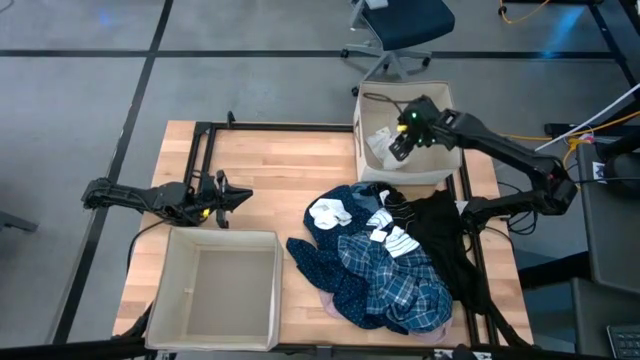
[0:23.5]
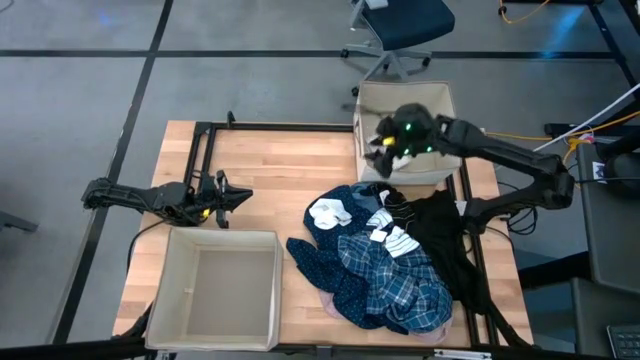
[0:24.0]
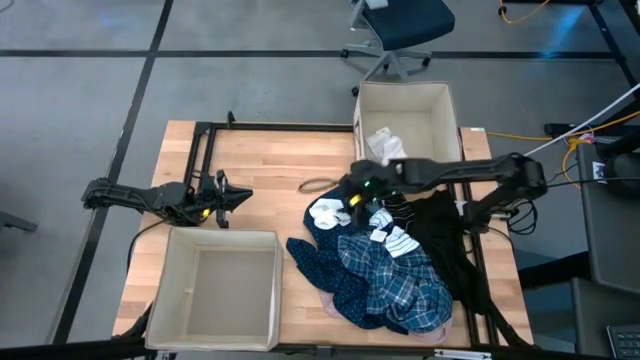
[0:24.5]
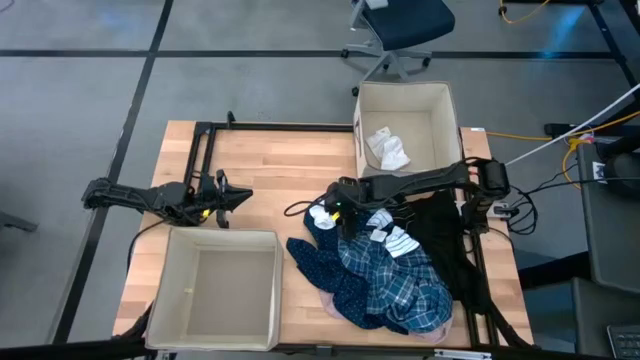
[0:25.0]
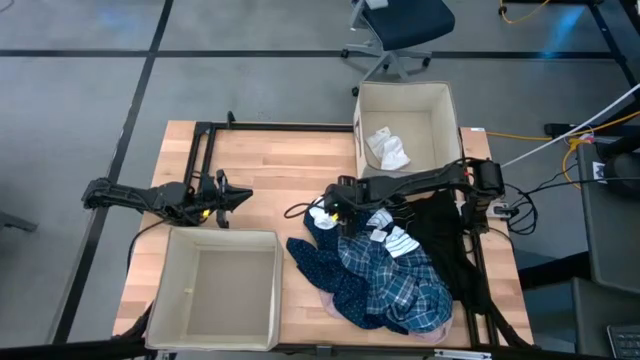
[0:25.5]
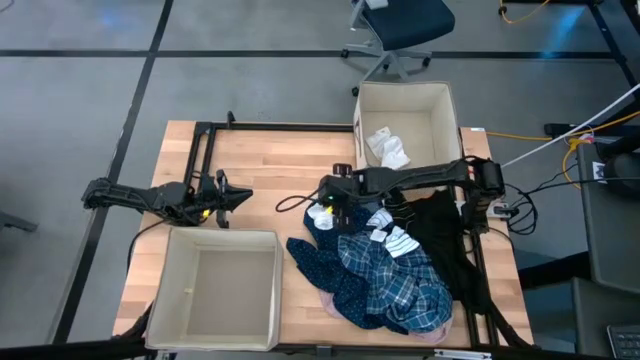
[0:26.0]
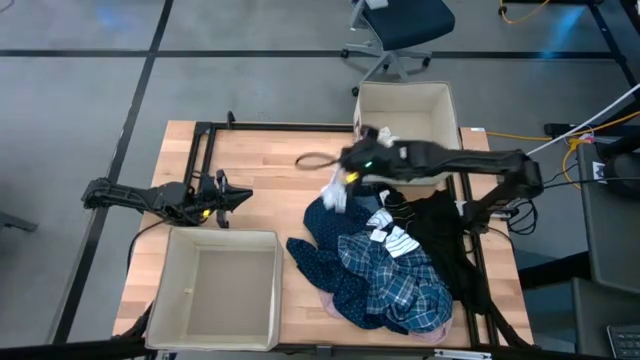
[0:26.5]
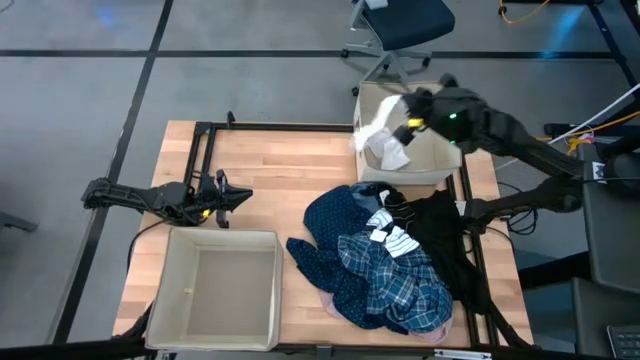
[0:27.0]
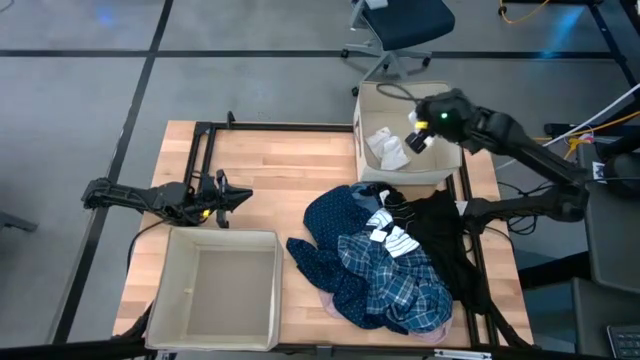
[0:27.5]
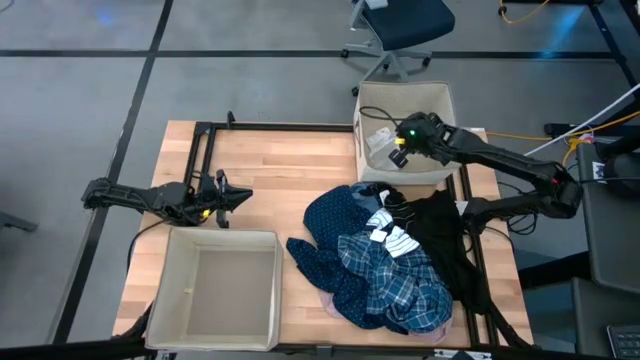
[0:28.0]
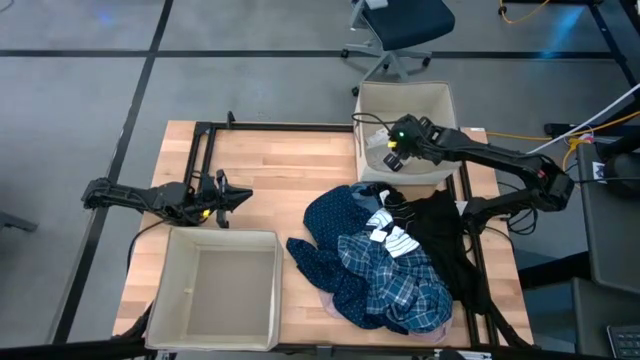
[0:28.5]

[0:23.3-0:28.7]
Task: Sort clothes
Put the white sock into the top laundry organizer

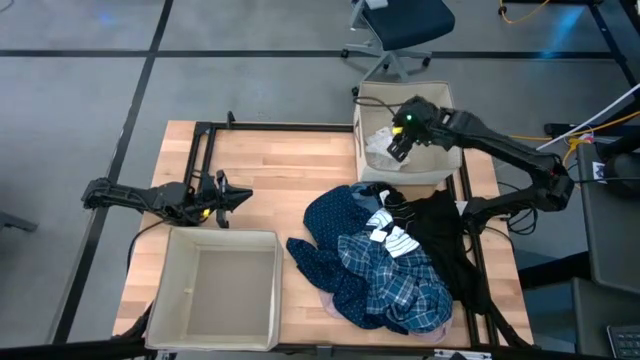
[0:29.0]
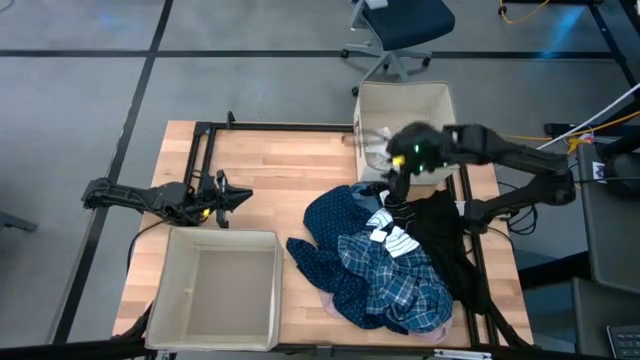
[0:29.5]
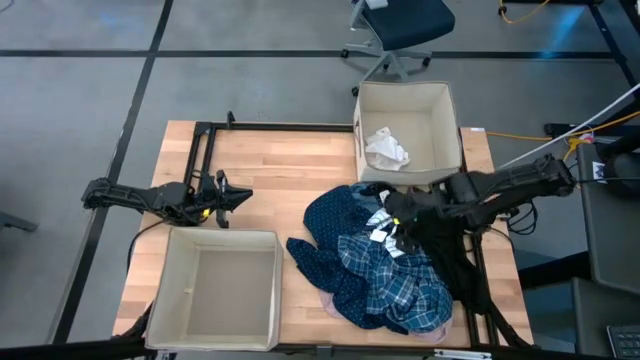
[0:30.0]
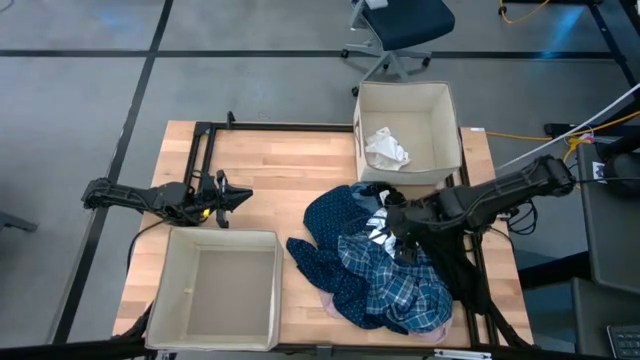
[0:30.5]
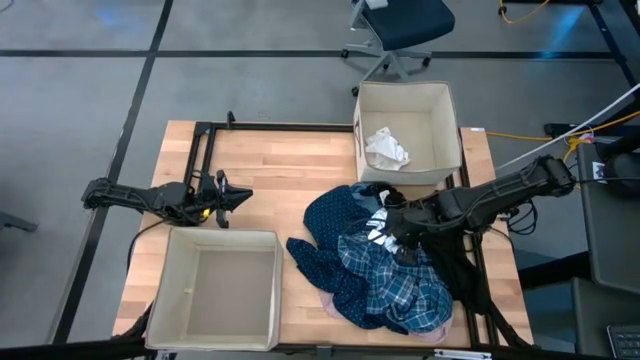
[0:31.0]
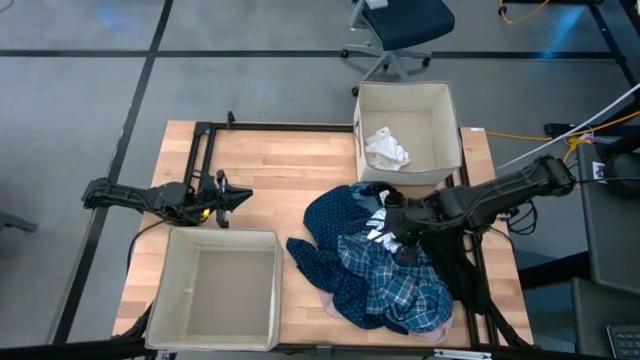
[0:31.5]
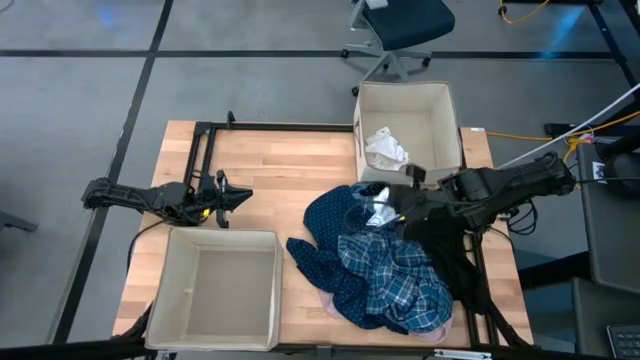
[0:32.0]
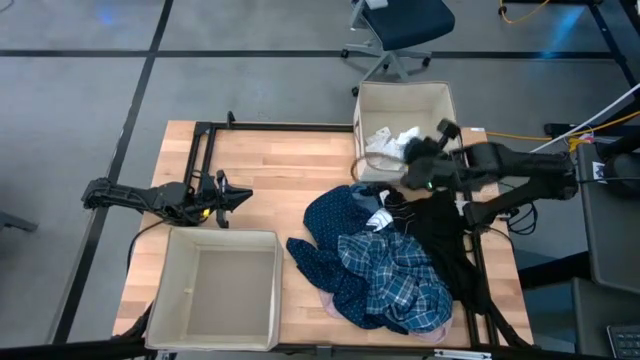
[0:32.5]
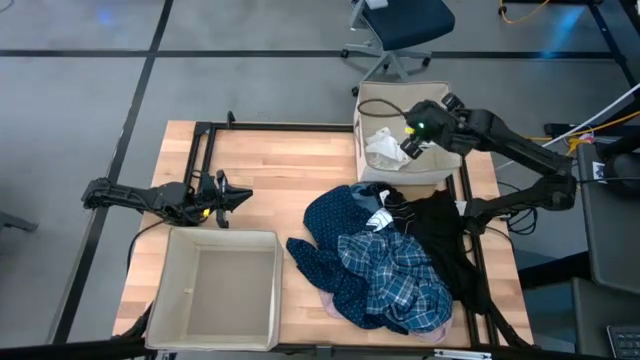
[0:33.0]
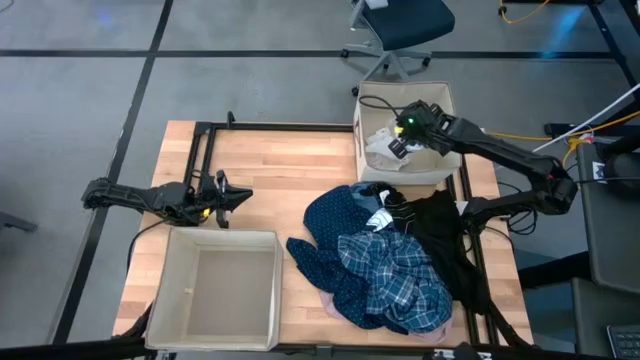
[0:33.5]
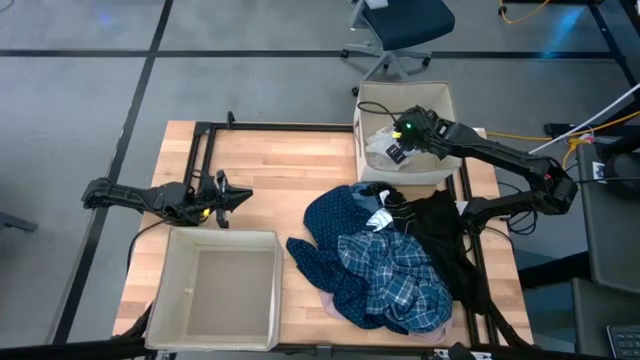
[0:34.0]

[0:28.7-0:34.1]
Put the white sock into the top white laundry organizer

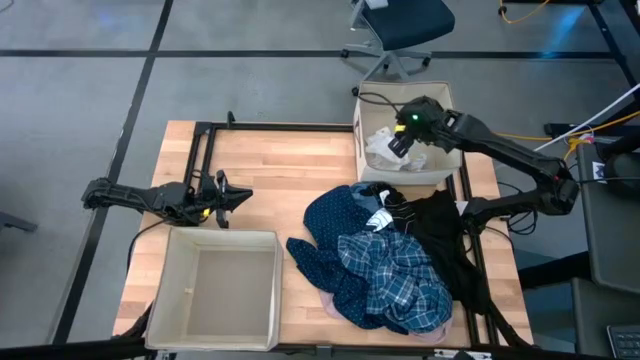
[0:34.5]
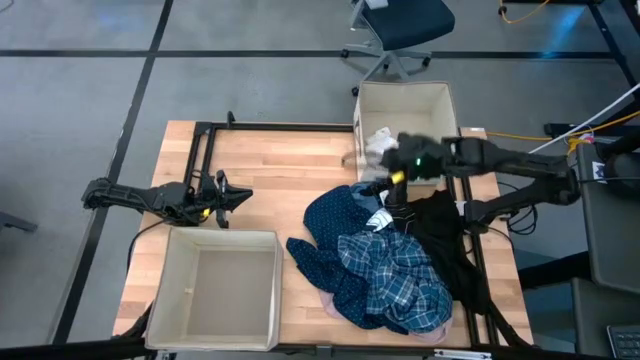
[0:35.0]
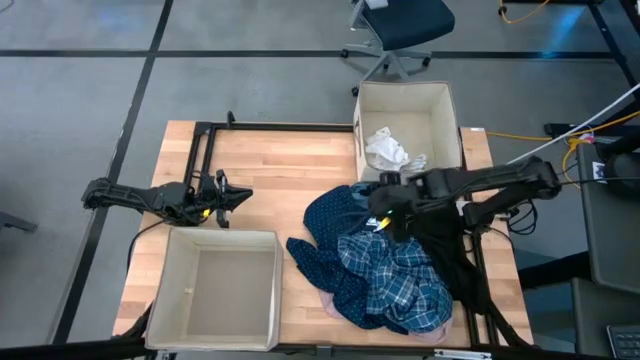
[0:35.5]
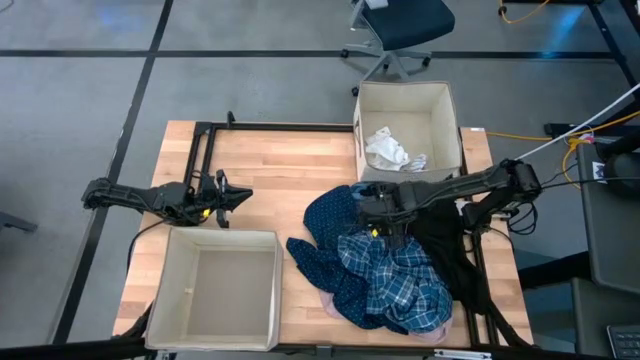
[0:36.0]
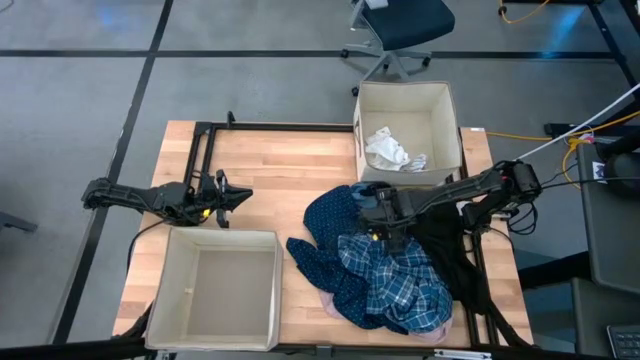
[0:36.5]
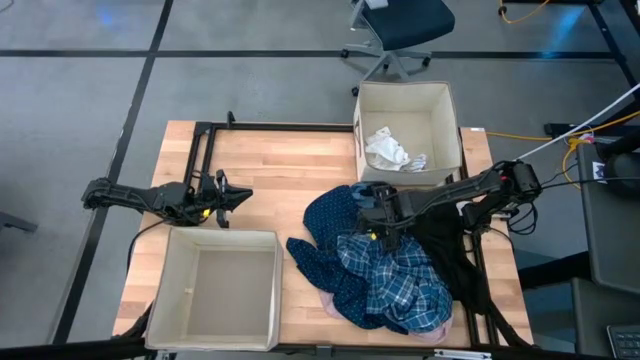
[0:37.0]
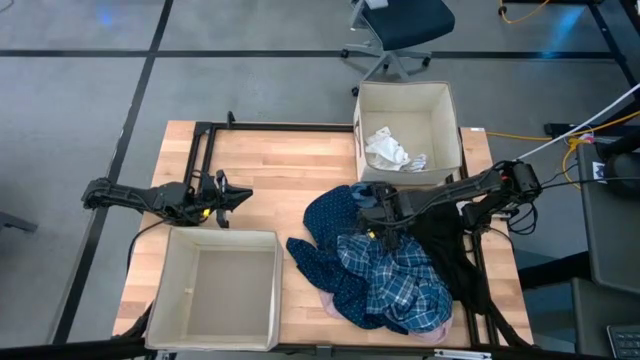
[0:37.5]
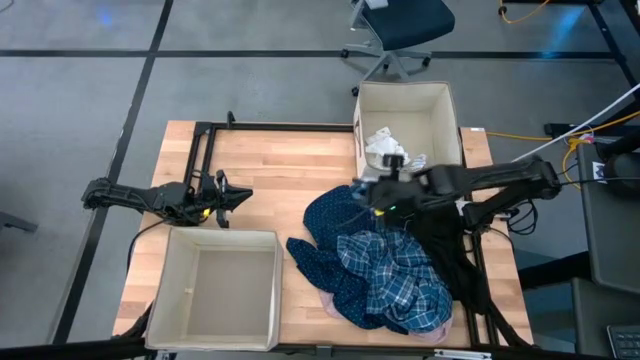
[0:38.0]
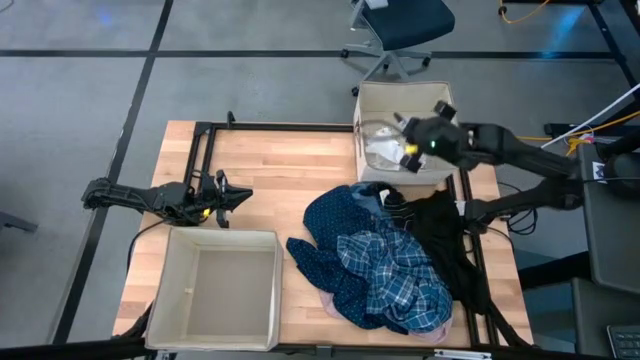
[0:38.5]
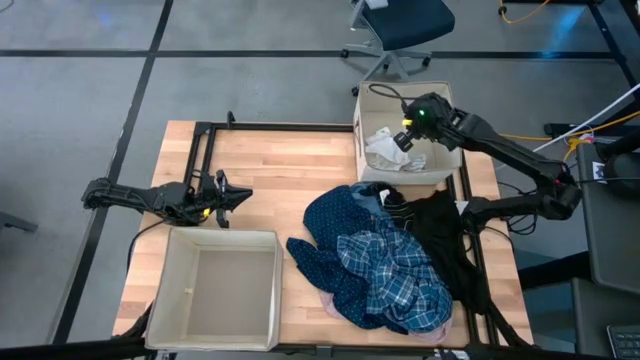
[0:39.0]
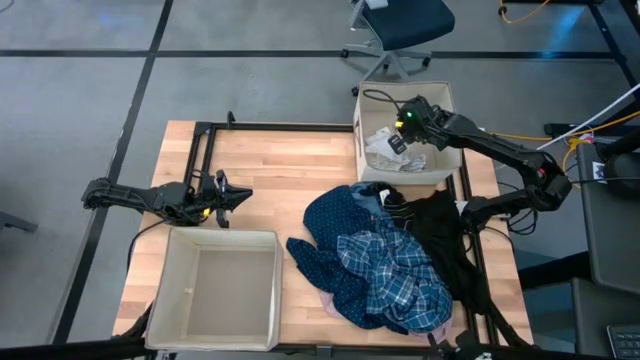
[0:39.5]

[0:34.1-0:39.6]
Put the white sock into the top laundry organizer

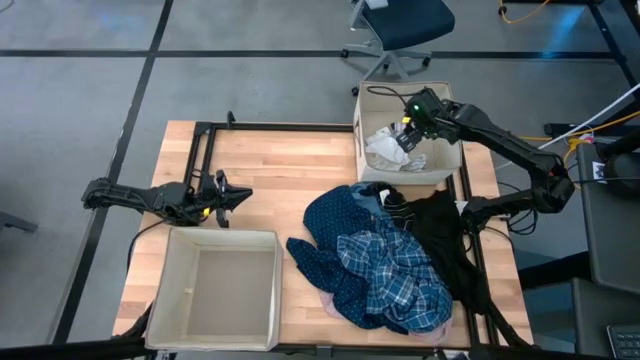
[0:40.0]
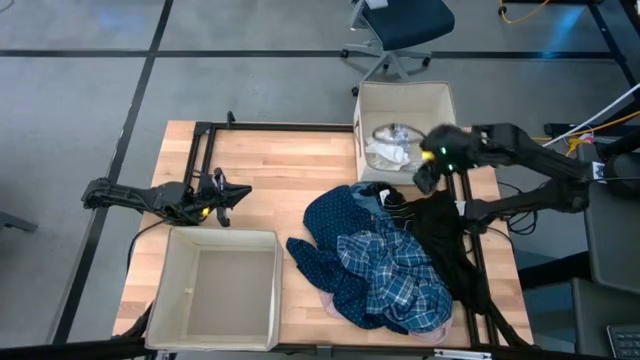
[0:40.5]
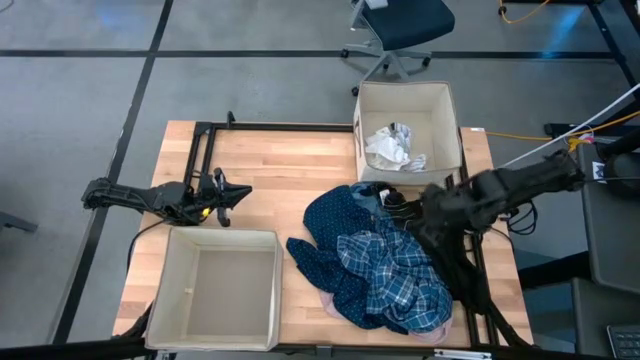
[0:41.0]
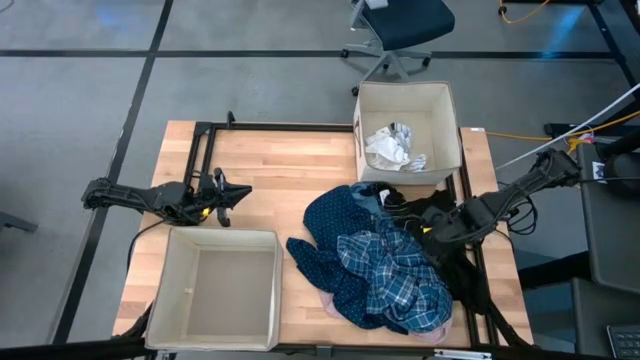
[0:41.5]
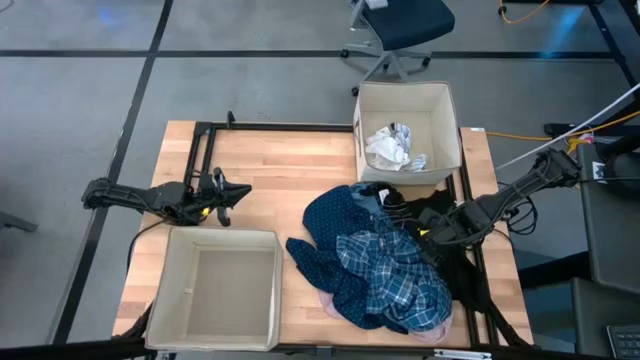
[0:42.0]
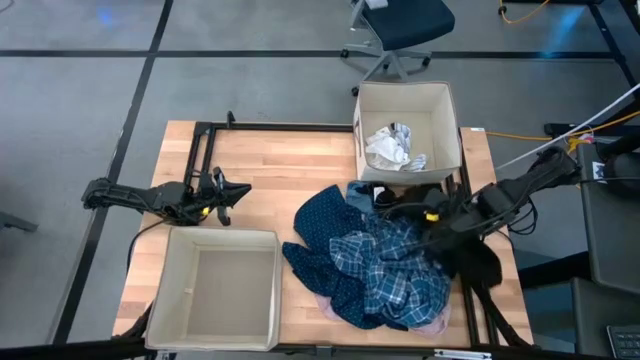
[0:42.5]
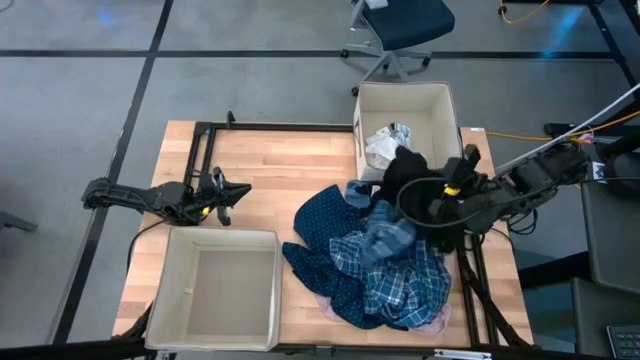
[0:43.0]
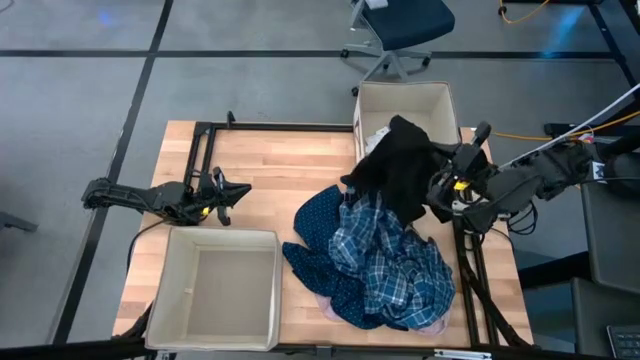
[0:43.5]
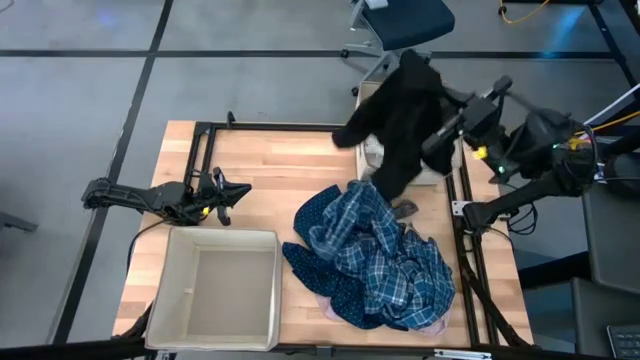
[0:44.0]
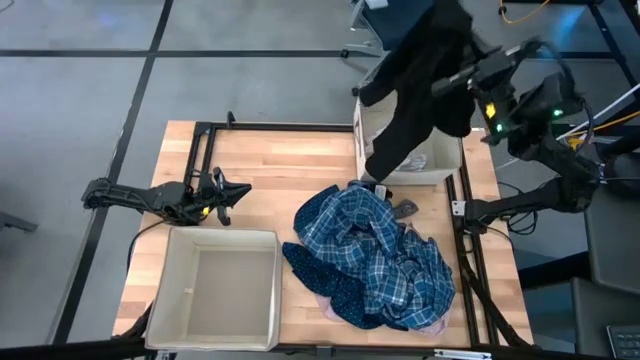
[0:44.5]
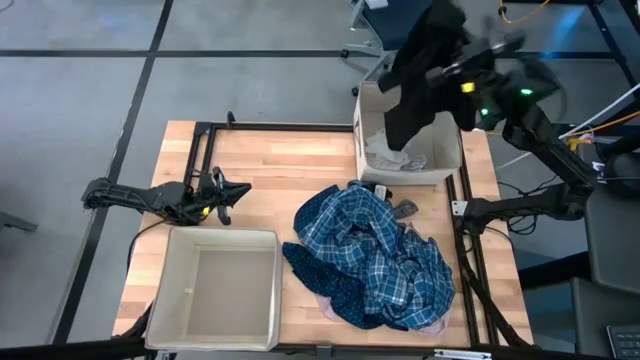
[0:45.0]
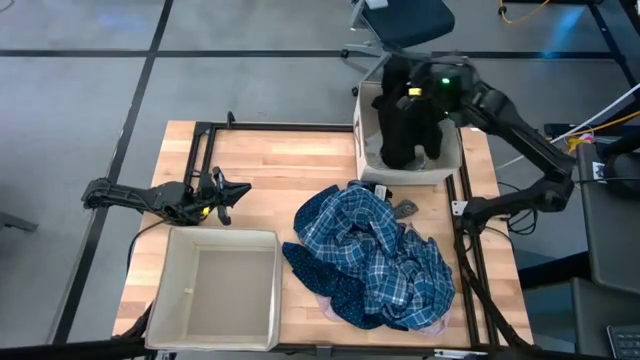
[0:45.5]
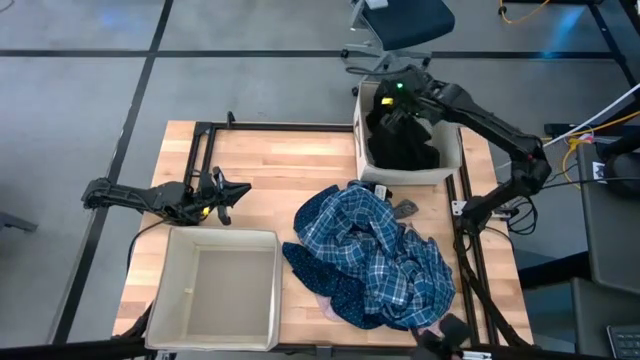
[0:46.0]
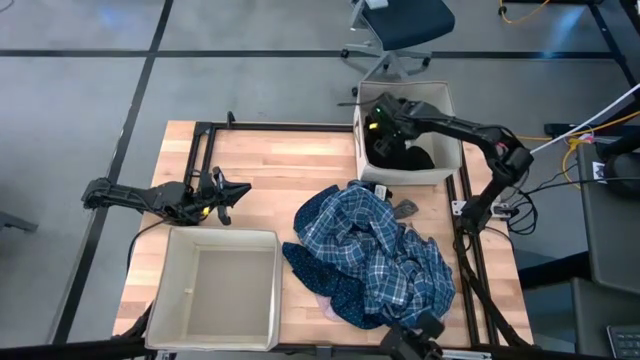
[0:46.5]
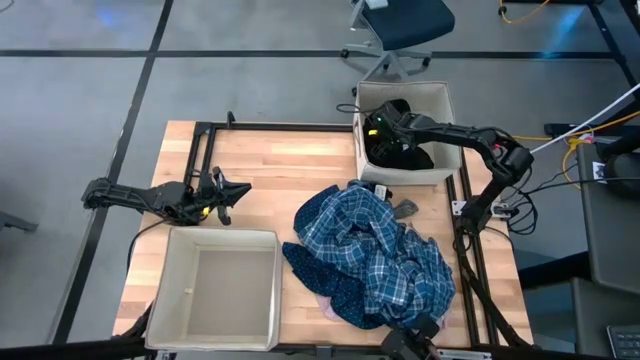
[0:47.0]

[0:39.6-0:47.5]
Put the black pants into top laundry organizer
